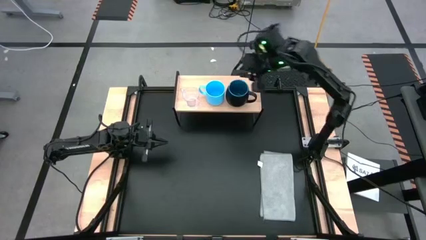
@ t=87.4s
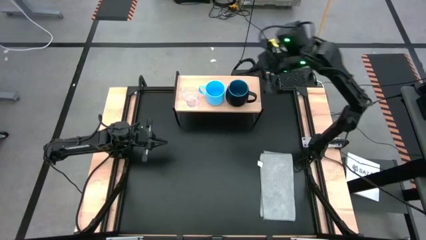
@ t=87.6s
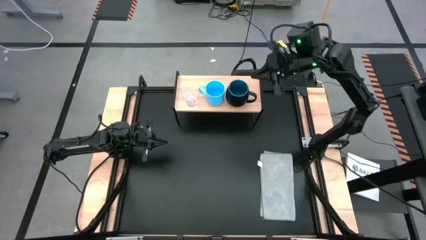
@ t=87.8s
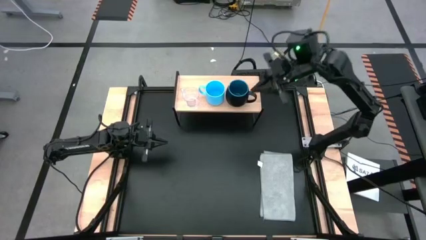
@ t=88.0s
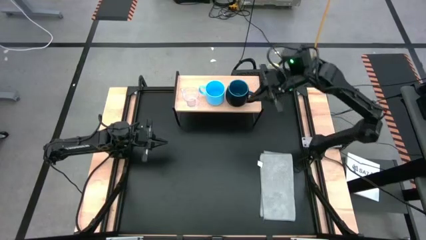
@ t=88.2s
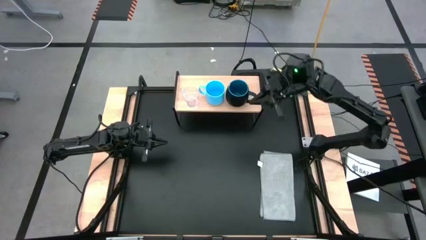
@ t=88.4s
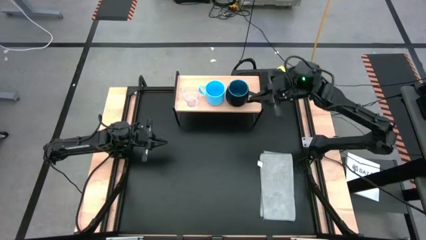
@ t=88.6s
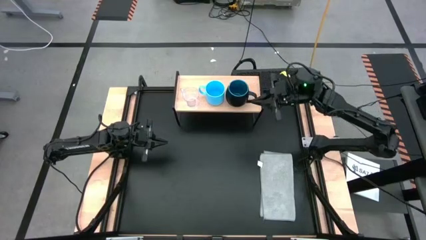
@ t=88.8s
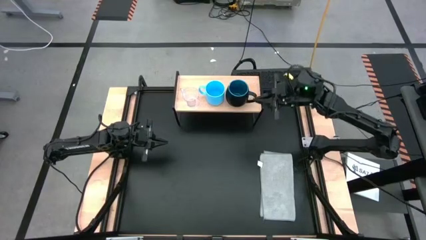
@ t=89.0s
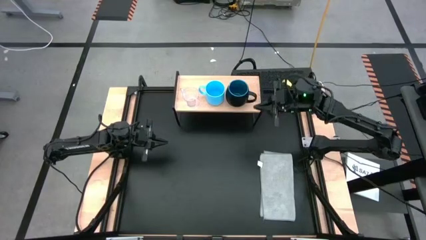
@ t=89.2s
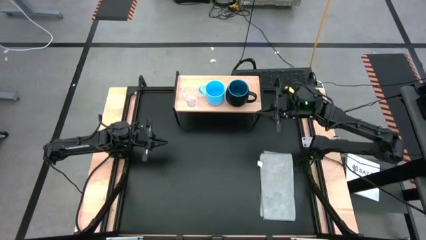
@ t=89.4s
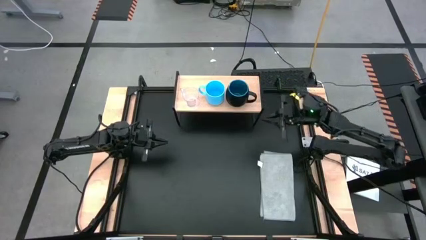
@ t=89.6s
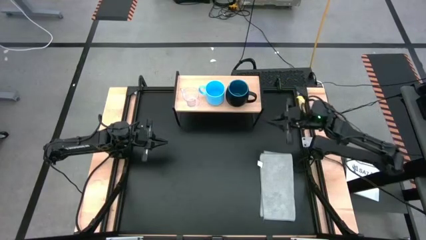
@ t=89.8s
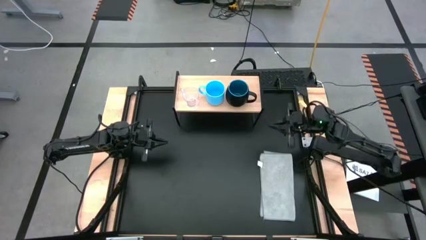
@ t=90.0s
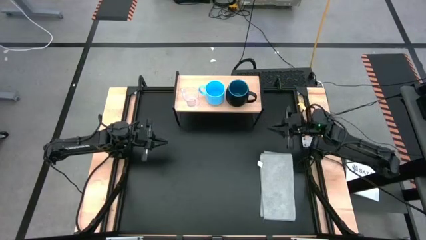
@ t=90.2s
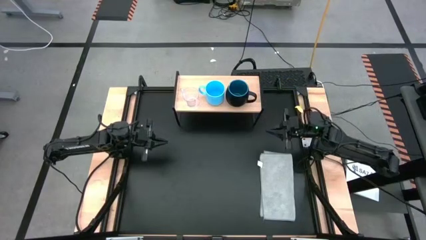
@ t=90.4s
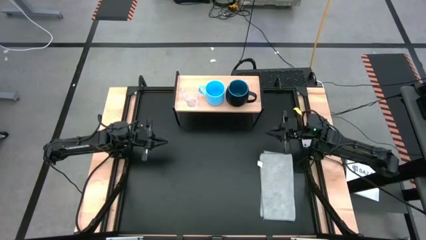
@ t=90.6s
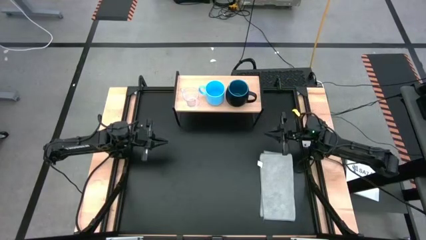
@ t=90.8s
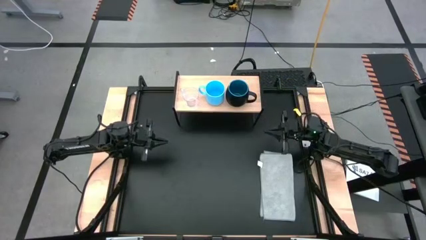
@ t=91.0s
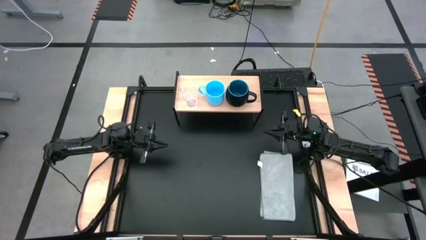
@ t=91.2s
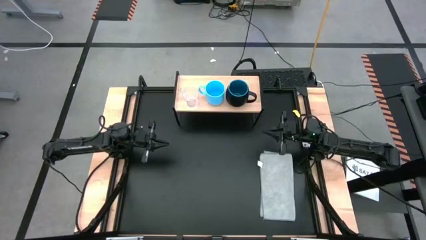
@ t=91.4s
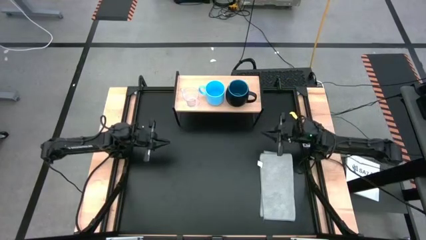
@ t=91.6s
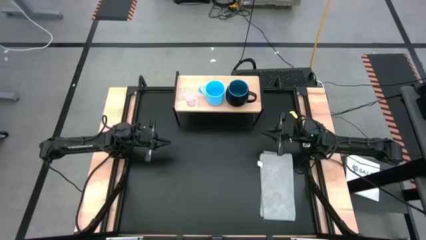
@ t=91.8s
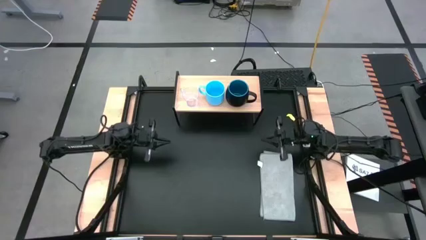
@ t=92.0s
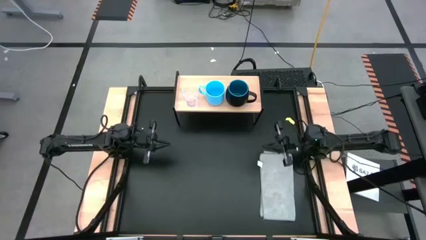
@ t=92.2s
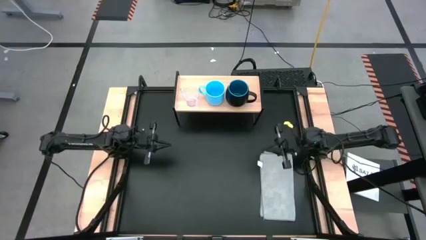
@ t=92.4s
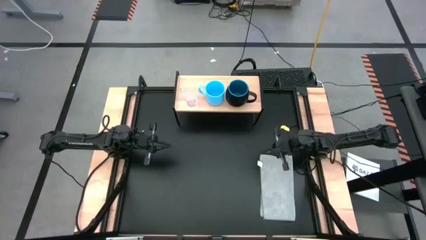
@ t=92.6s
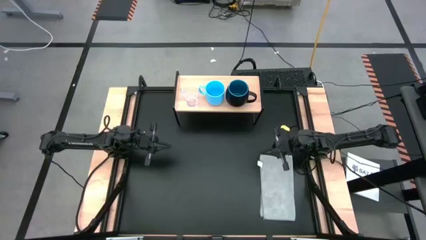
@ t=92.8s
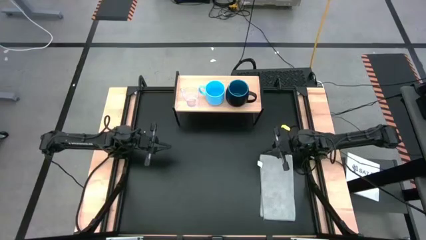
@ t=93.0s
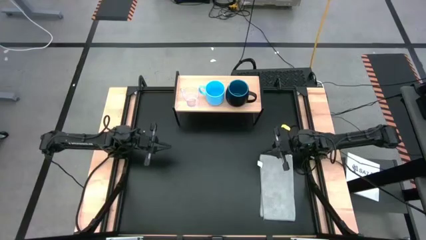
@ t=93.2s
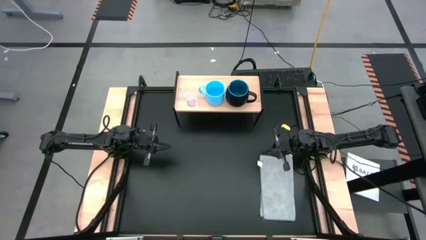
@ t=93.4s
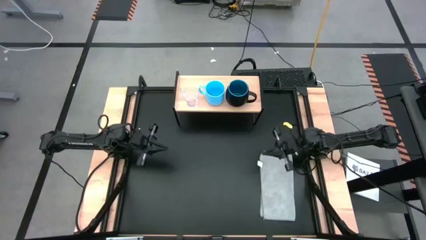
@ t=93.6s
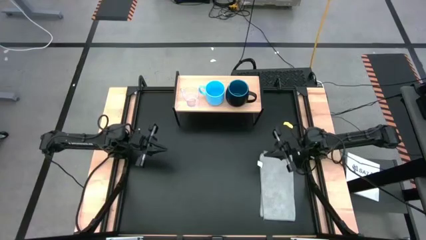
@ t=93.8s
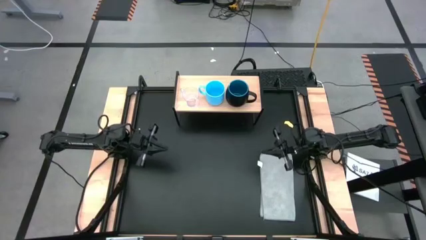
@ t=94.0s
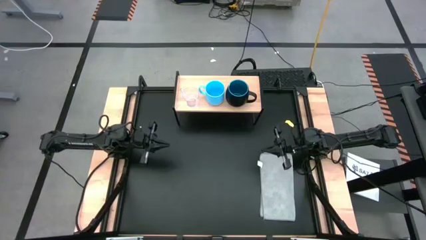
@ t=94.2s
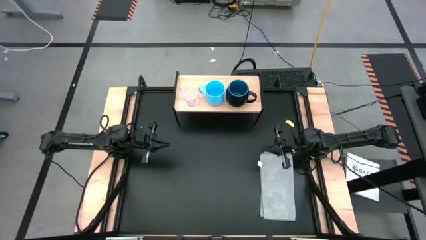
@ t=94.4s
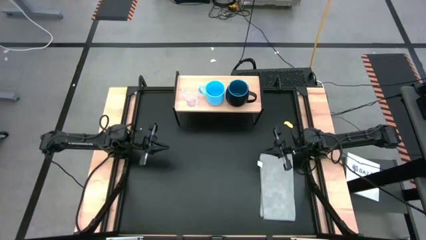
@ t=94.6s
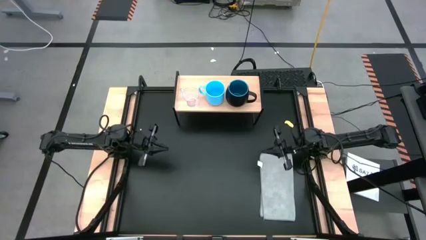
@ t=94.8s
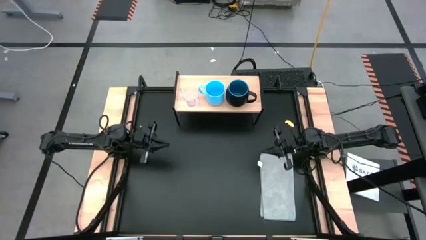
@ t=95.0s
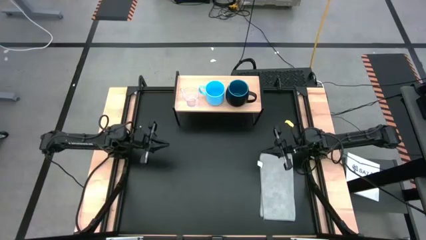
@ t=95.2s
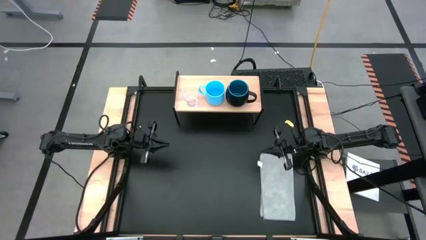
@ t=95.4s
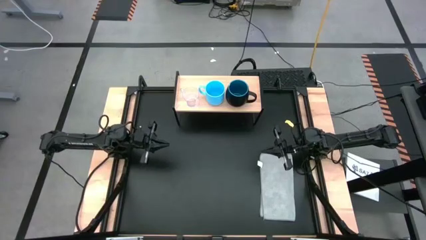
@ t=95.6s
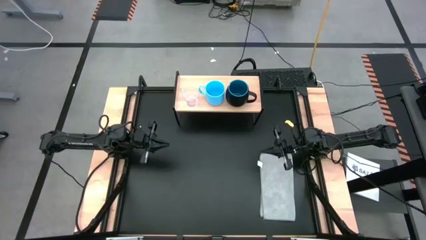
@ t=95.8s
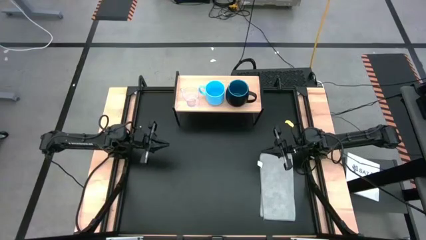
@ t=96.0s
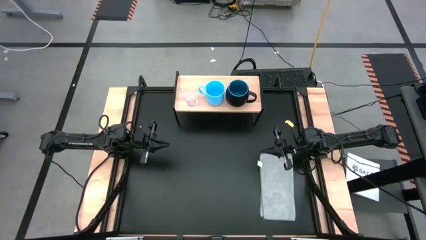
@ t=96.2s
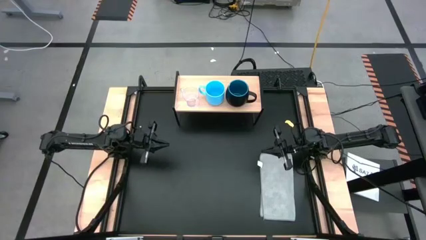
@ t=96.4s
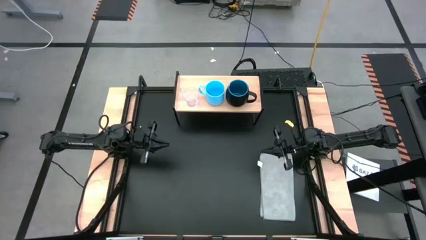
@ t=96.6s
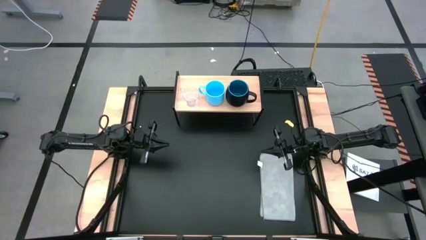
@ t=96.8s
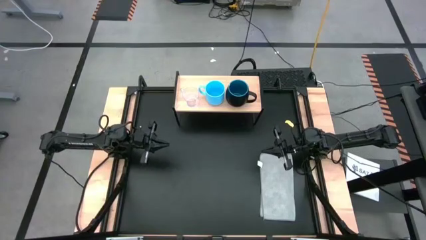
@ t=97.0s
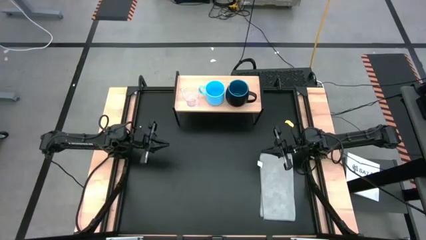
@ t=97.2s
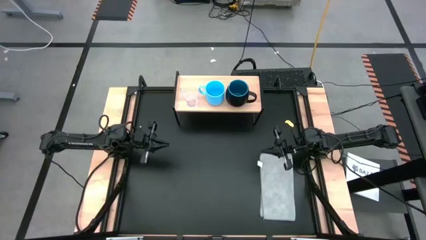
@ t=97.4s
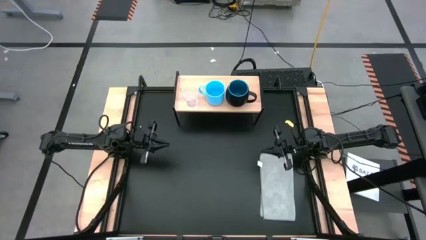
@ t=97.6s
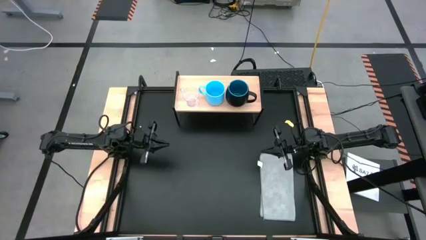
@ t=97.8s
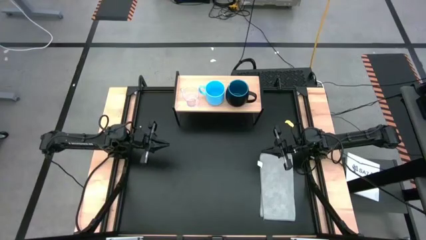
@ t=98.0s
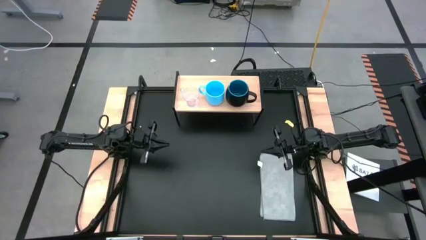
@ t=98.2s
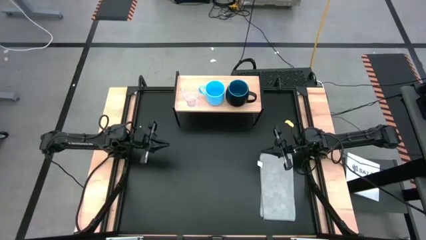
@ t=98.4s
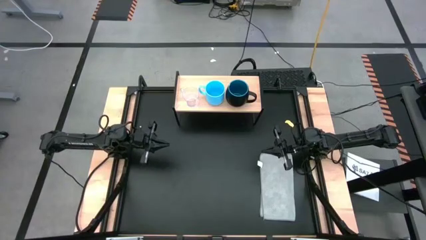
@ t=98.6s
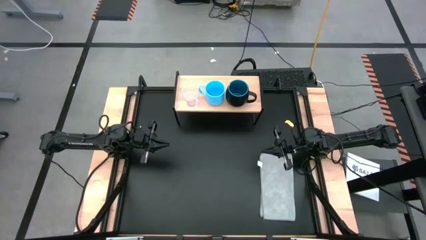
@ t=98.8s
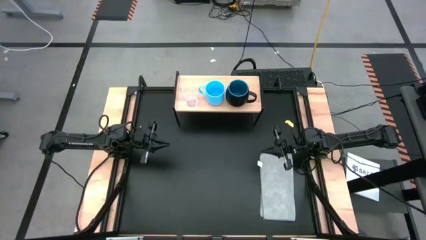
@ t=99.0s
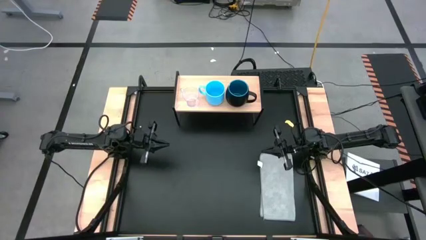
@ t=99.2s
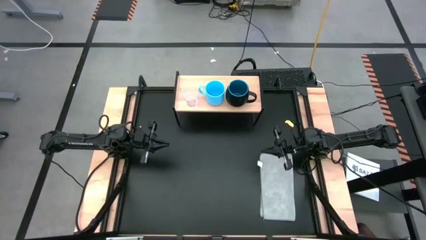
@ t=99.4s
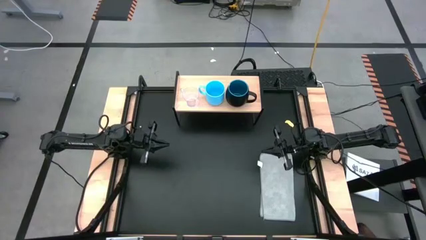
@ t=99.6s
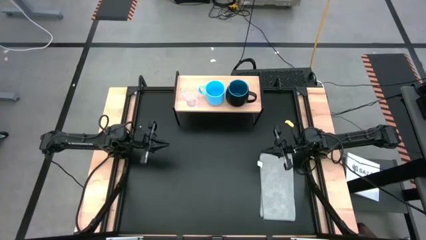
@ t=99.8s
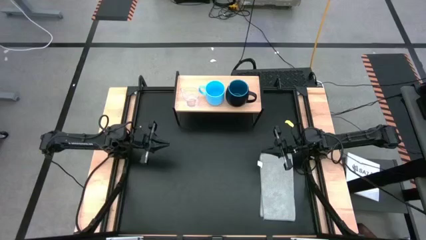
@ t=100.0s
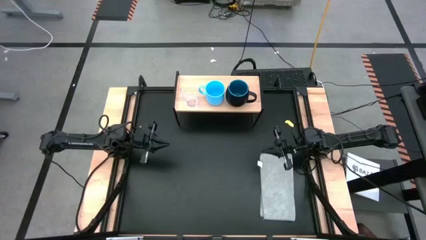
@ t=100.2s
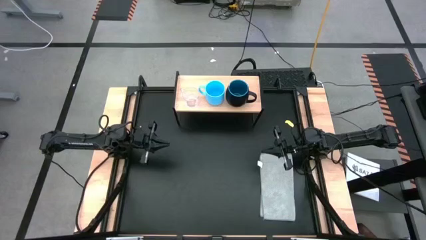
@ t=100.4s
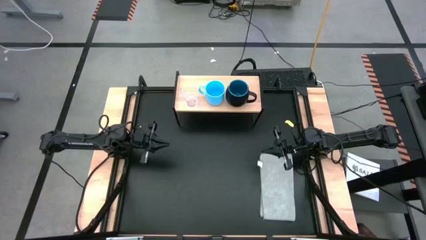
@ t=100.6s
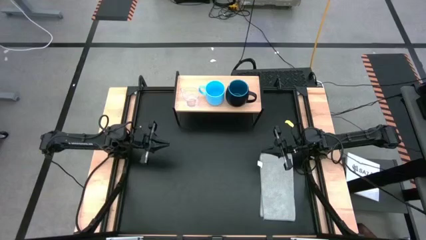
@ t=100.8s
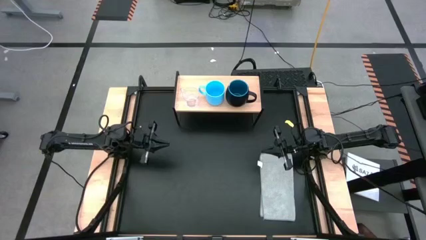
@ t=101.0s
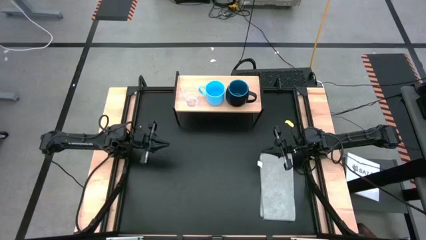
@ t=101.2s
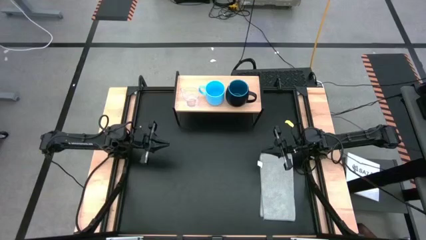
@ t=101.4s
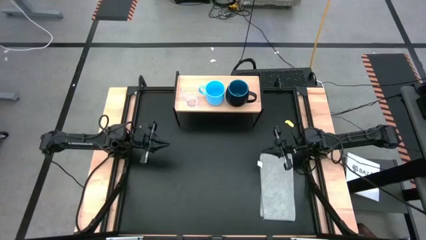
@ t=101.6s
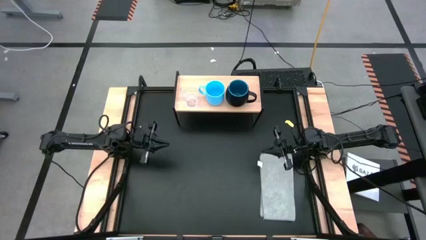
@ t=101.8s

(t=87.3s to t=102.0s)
Task: Stack small to large cups/mugs on shelf
Return to Home Position
